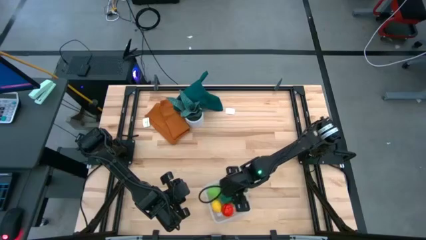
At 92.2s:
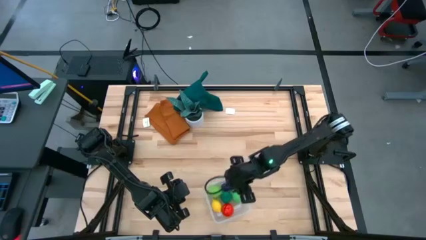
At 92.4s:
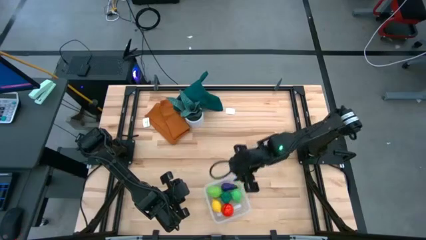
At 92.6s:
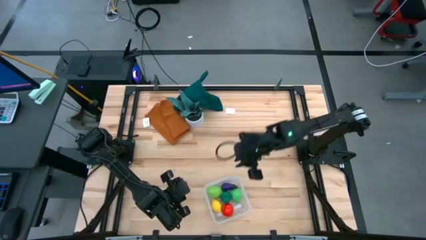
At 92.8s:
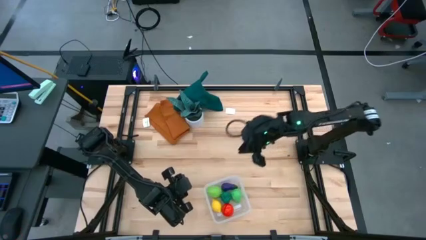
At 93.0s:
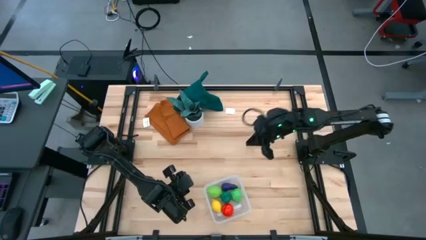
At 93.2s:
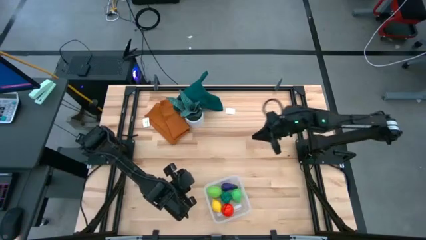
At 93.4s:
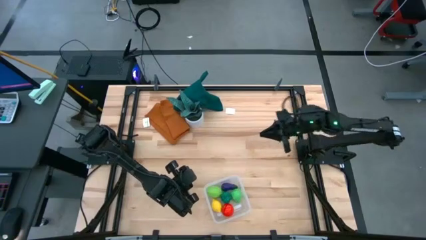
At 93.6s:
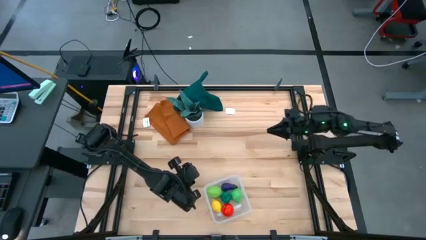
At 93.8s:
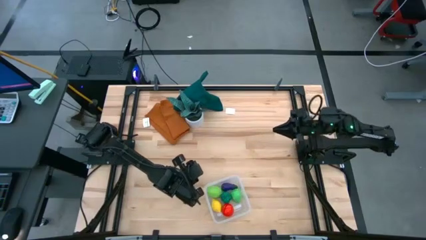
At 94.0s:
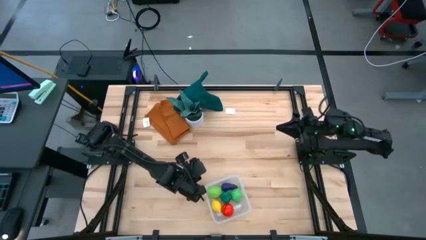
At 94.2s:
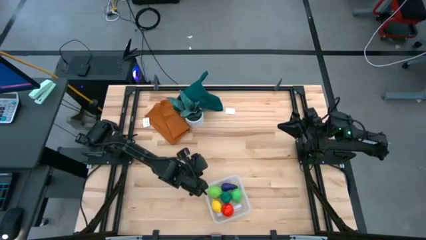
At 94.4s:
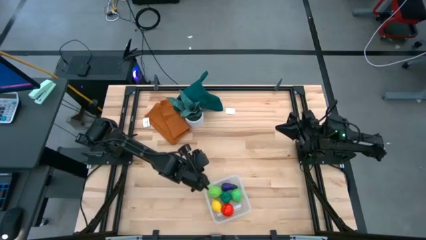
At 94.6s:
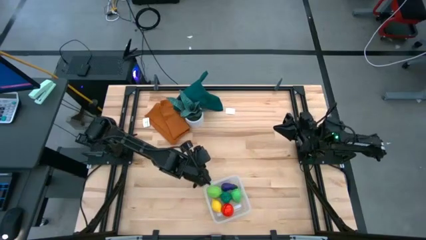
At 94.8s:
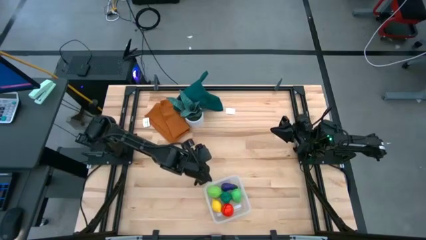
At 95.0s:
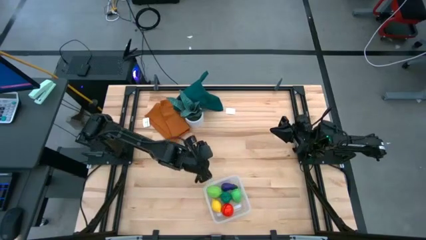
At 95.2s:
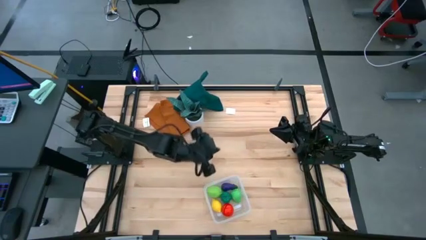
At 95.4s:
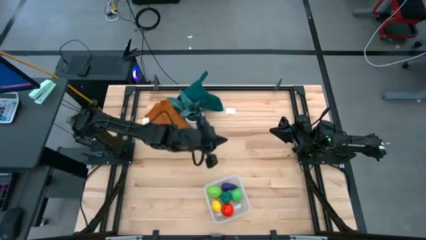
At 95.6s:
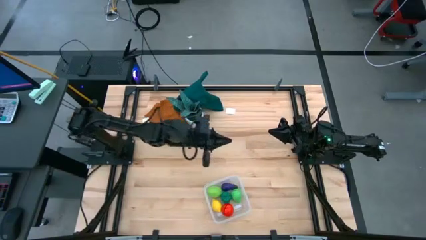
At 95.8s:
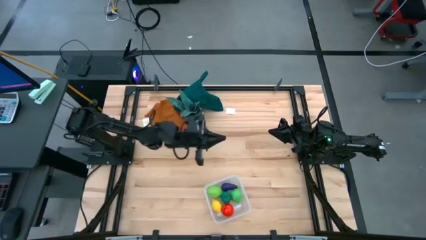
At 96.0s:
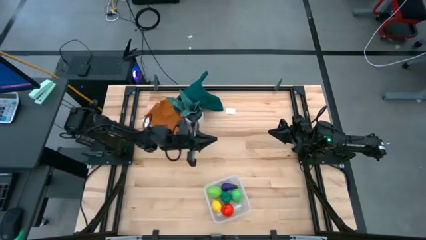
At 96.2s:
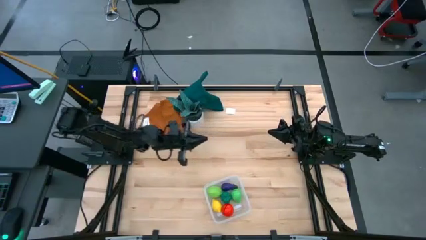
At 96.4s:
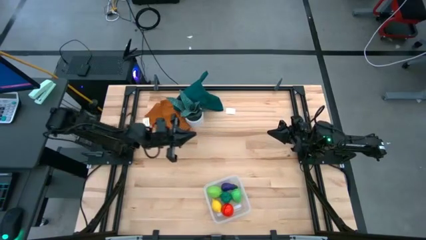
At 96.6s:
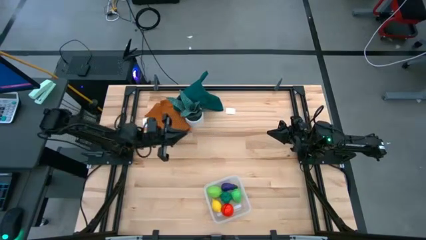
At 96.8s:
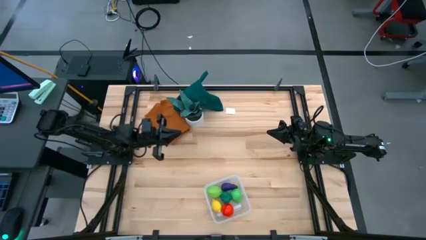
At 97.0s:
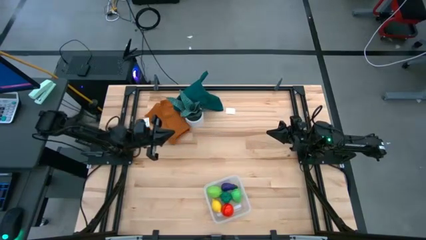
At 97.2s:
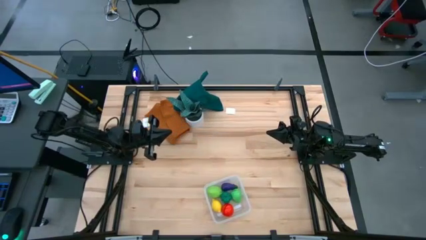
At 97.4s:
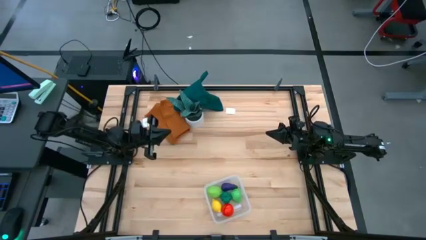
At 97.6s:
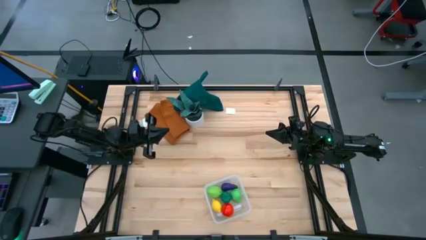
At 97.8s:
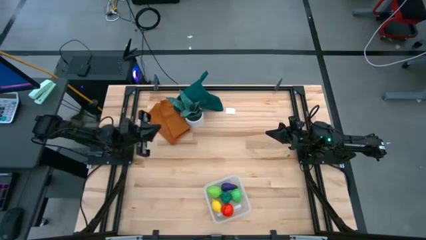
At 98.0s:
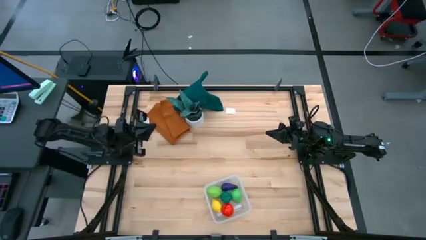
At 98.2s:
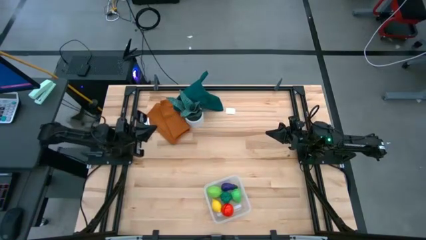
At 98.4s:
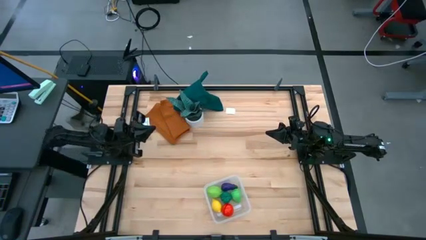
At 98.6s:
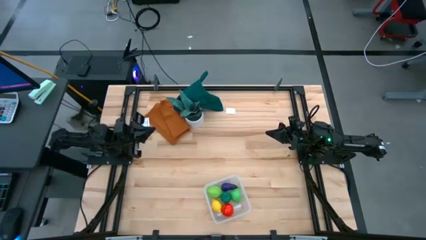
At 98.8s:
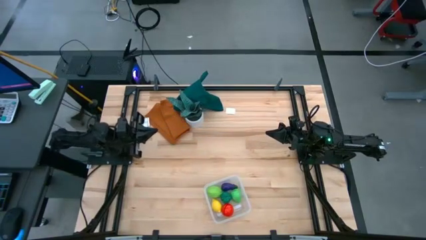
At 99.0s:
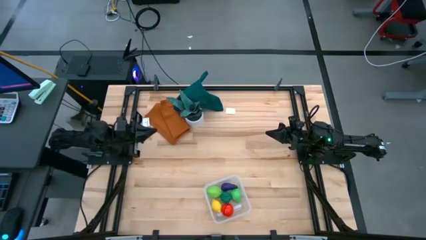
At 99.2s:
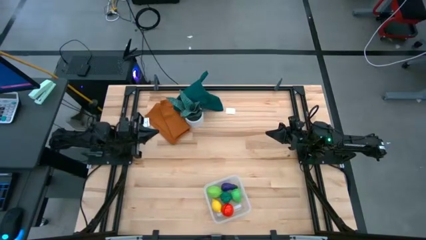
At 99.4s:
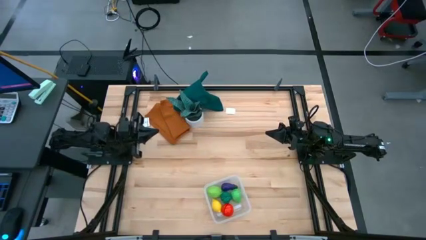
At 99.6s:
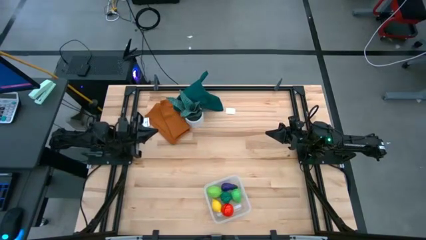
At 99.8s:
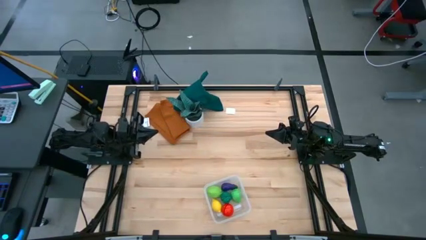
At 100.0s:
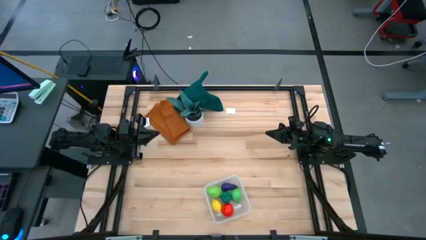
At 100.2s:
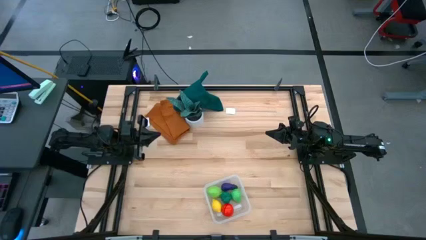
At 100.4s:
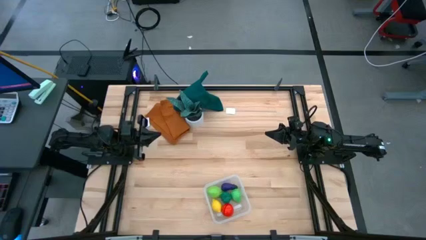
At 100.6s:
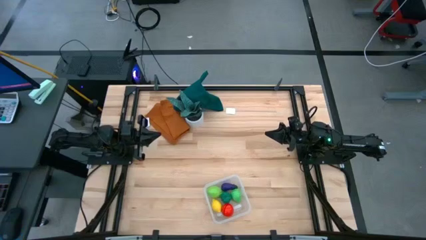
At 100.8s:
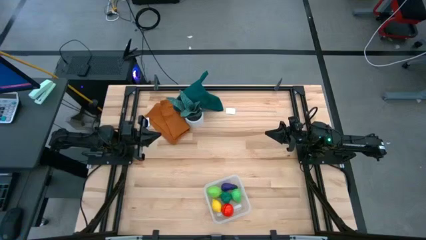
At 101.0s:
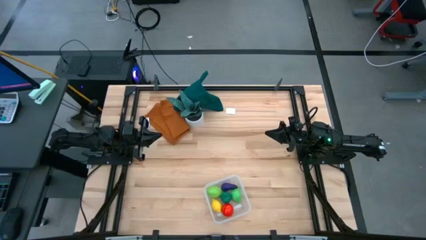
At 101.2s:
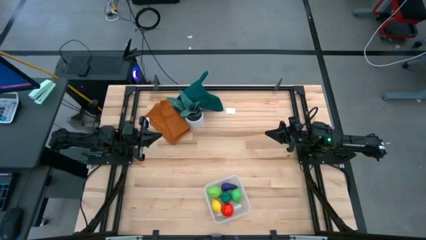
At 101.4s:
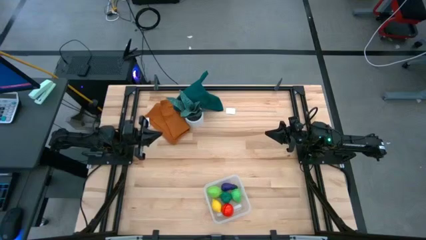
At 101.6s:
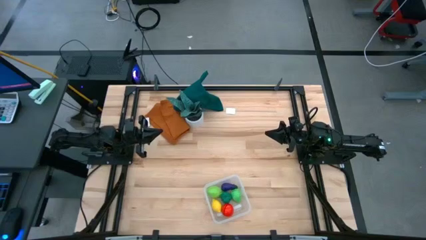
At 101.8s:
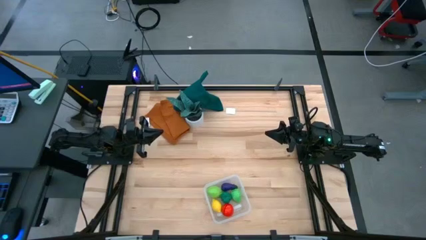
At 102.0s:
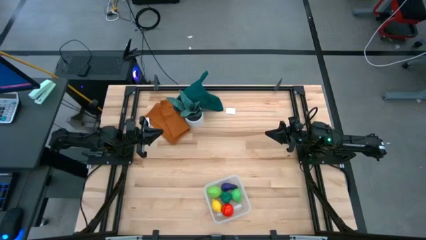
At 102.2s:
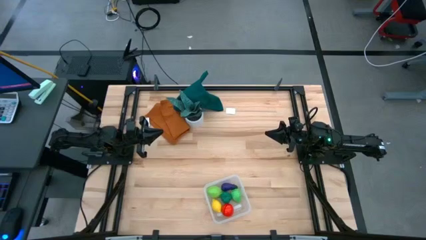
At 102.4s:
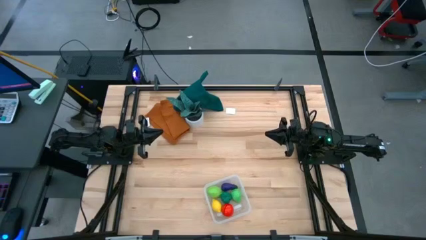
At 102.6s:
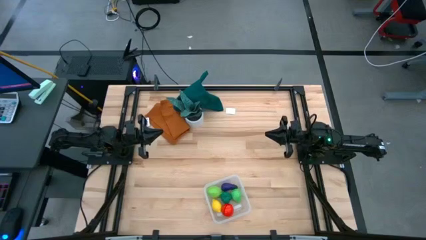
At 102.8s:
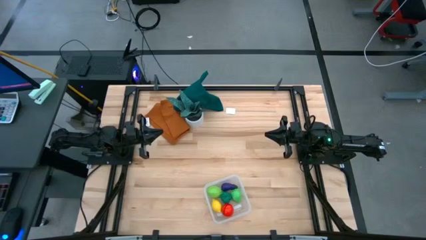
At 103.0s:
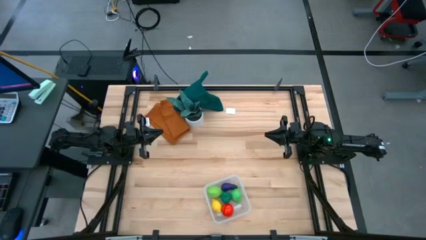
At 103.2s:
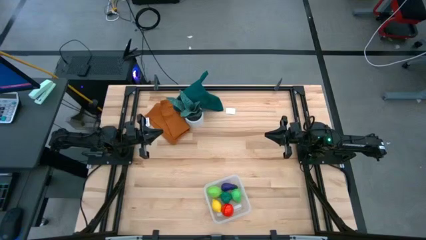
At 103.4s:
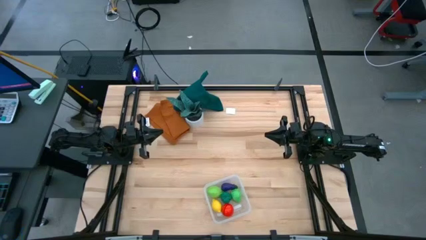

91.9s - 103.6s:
Task: Pick and placing Produce into tupperware
Return to Home Position
